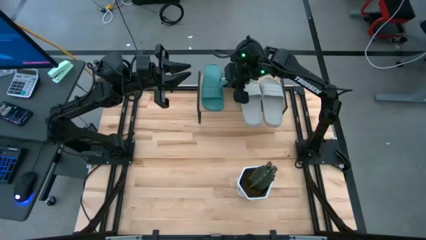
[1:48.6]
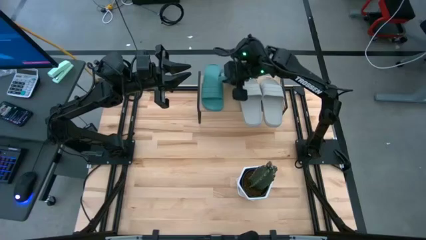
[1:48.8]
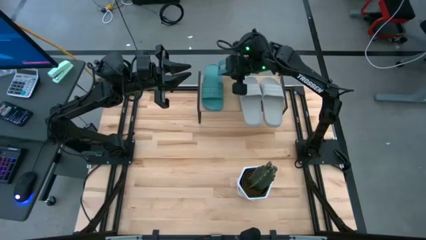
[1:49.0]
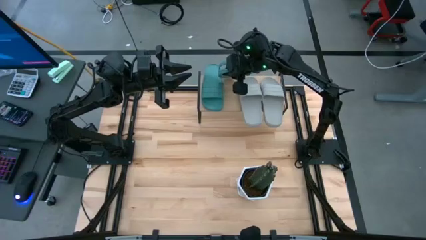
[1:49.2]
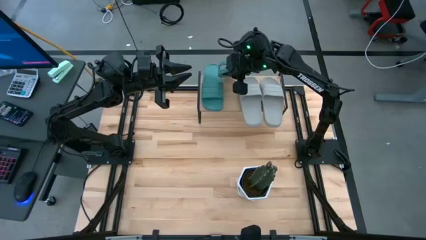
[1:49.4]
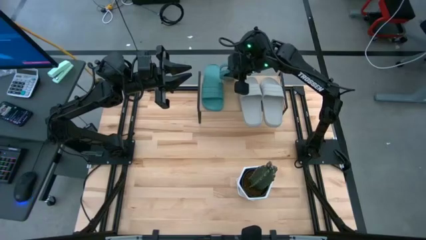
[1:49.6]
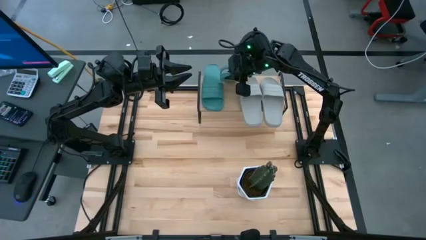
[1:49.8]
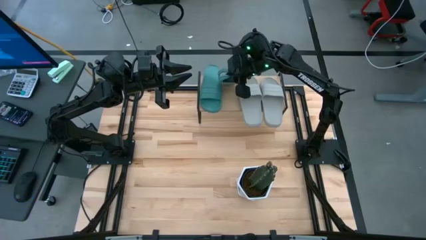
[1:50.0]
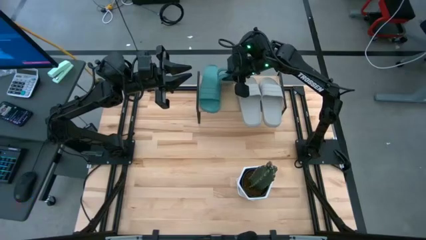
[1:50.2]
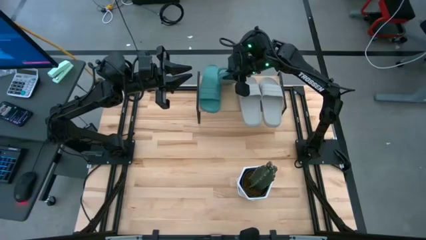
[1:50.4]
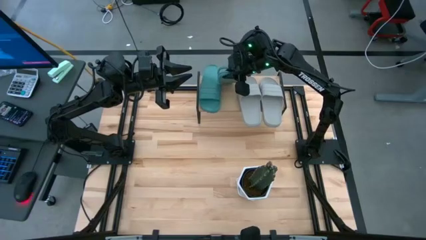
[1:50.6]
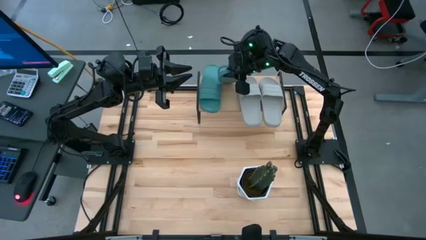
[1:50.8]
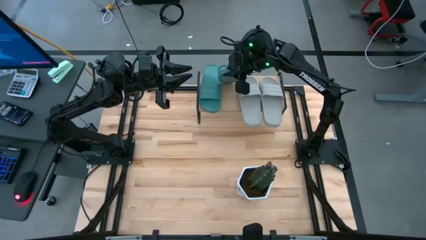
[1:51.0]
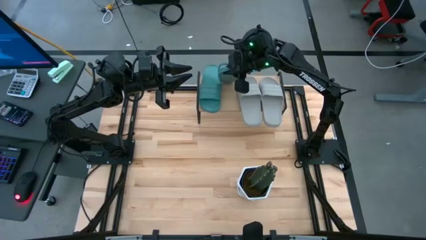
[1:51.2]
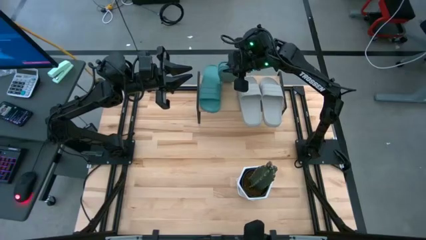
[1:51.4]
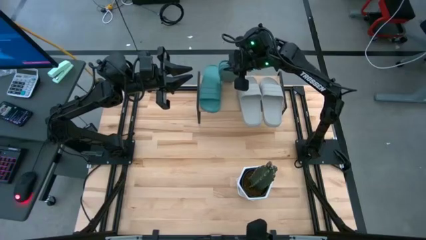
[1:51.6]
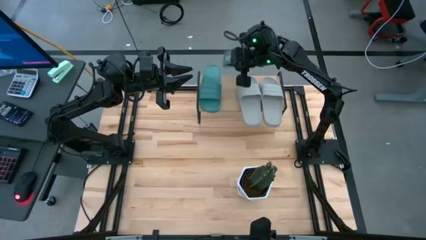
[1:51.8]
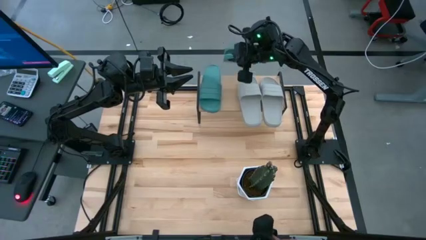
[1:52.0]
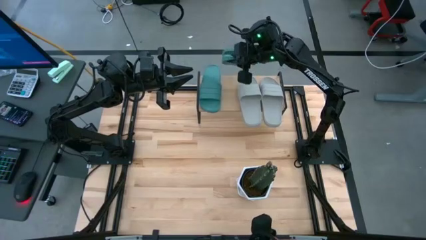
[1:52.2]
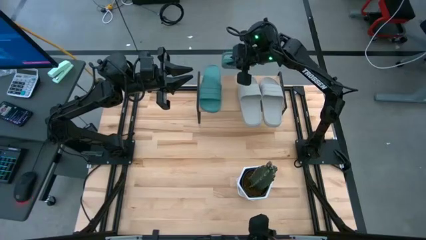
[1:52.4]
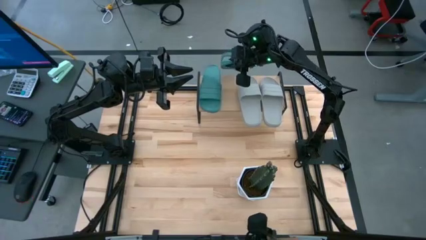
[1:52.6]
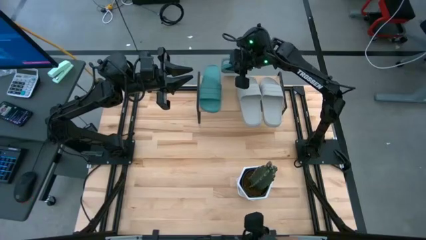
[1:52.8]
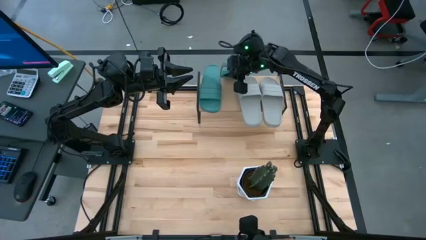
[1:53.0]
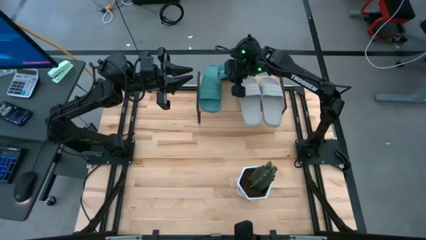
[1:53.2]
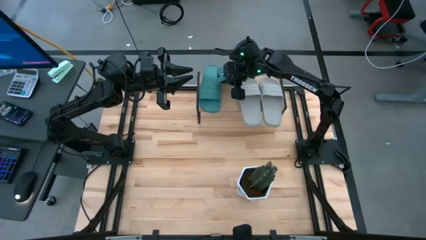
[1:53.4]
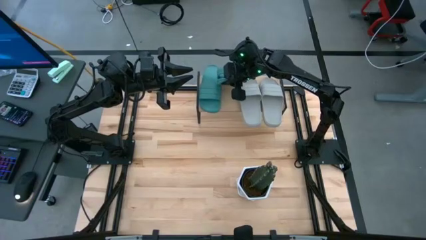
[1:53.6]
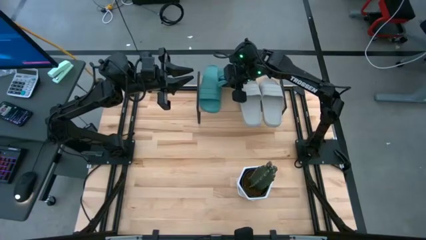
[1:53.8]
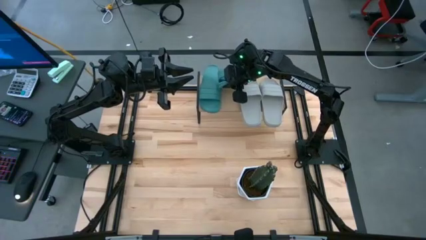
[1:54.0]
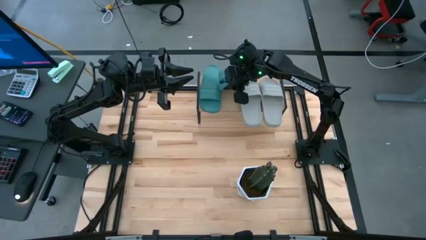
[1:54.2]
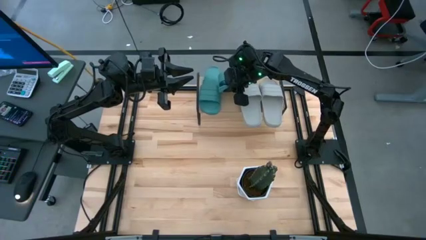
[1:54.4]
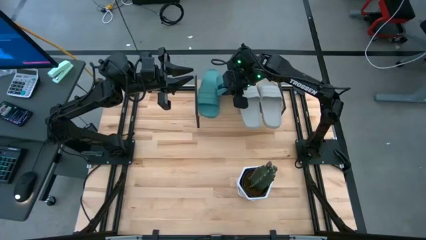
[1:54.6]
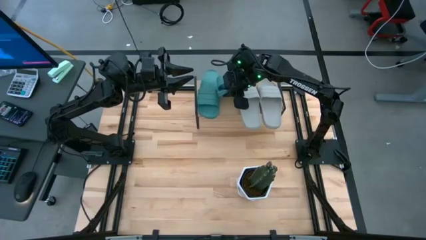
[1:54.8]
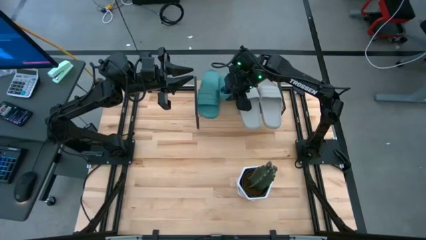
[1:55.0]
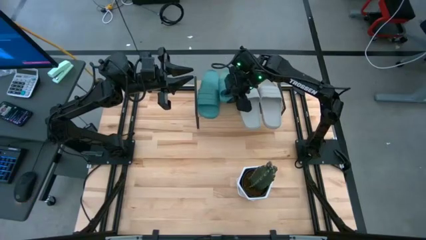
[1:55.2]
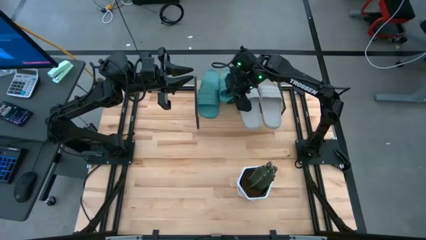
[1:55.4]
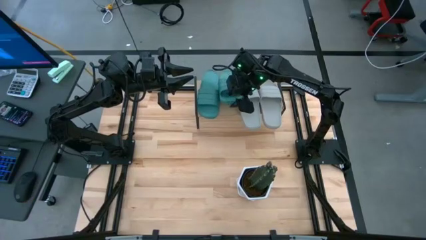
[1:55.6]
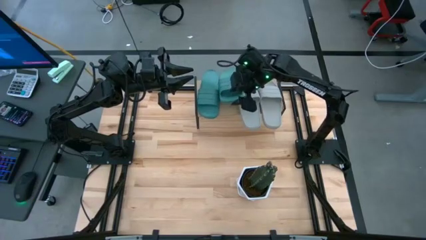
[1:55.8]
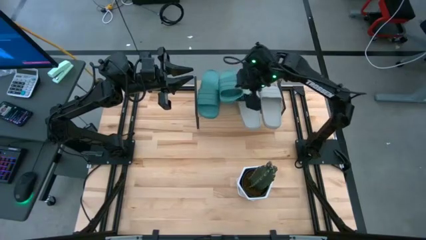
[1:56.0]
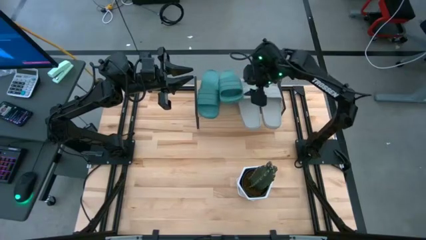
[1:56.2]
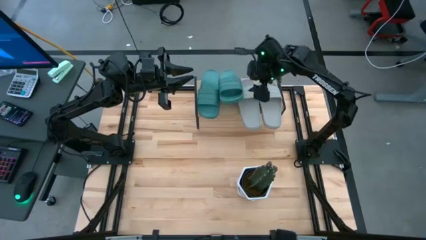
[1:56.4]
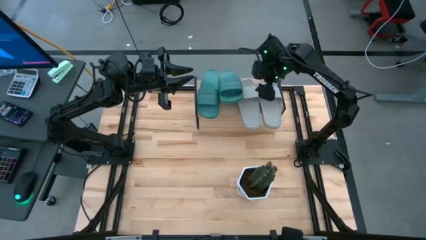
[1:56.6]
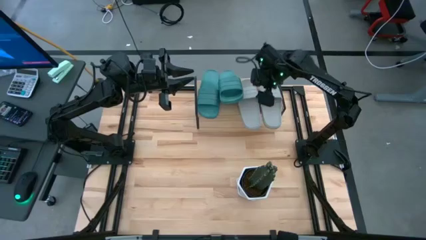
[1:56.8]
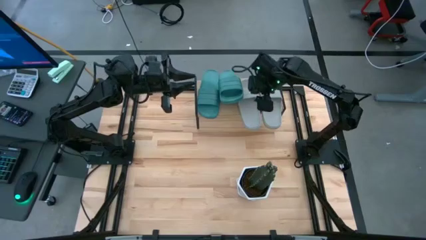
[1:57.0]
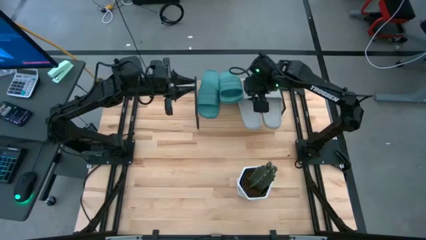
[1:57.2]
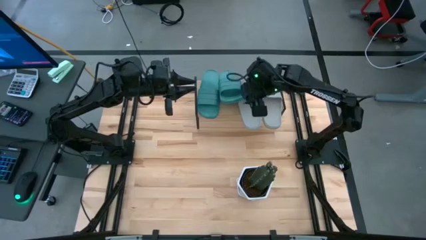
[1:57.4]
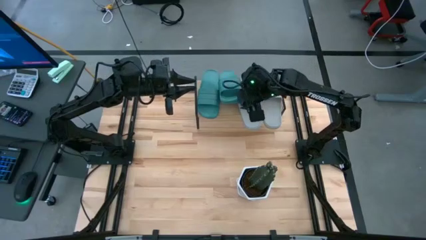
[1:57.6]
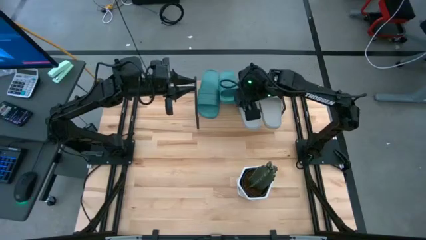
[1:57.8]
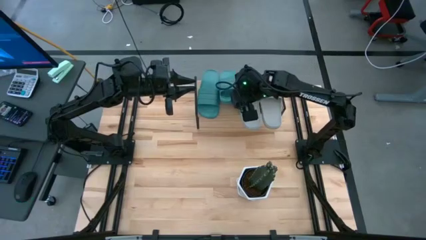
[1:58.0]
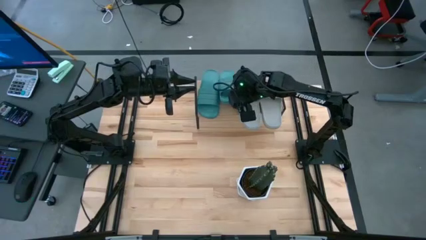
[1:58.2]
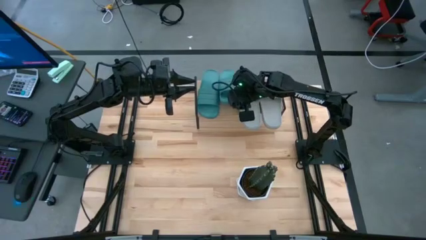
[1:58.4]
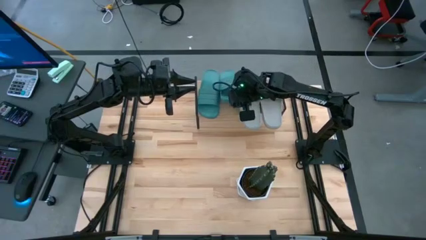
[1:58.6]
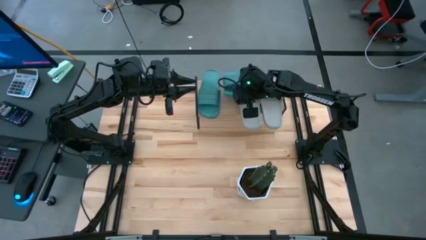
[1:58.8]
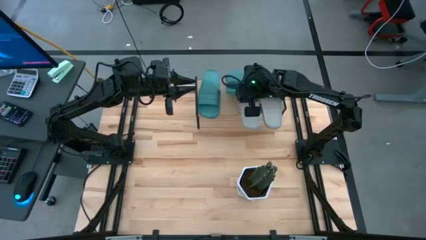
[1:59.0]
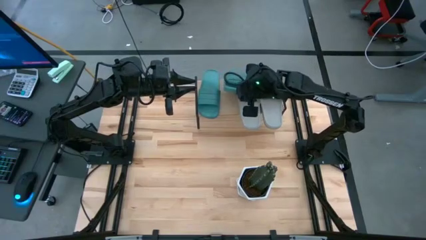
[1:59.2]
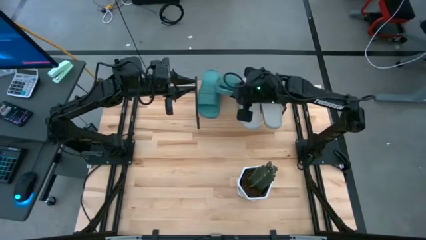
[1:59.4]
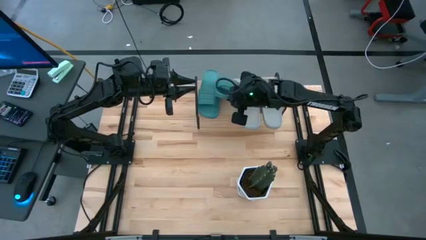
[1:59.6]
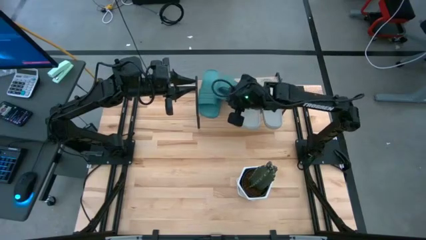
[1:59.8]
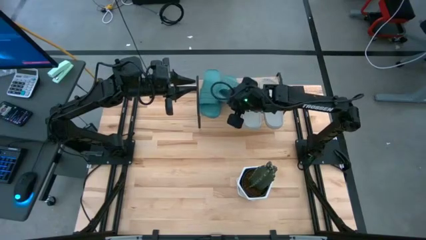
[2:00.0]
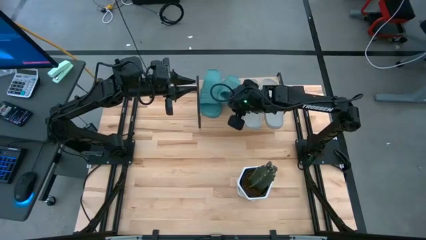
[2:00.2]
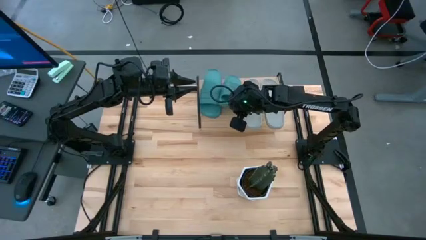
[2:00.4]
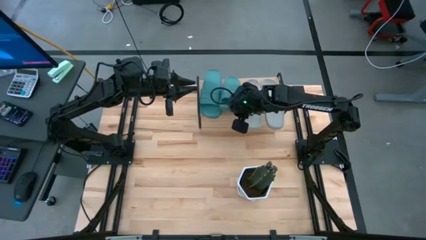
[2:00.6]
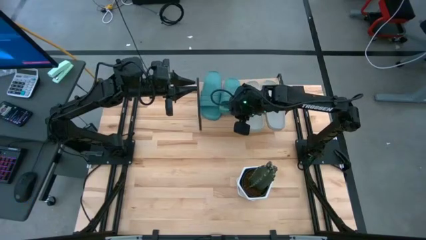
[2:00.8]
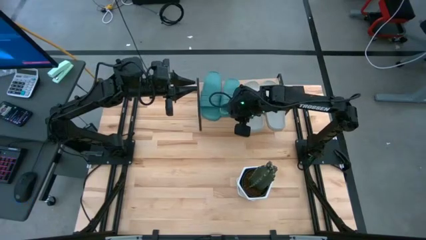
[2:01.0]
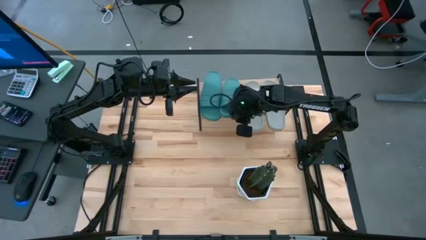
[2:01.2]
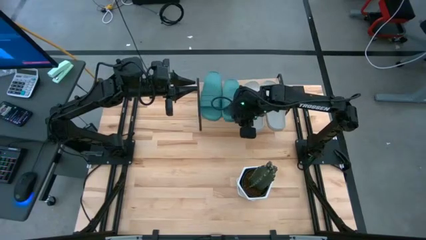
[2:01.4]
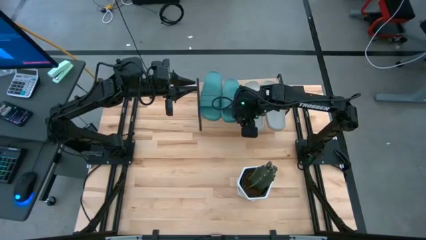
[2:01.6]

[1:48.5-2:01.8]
Task: Pick and place slides into the shelf
Put the green slipper on the shelf
